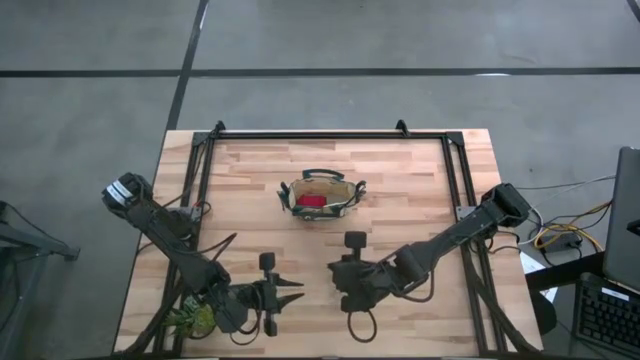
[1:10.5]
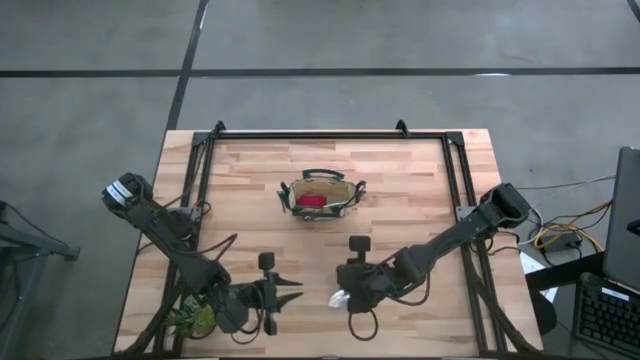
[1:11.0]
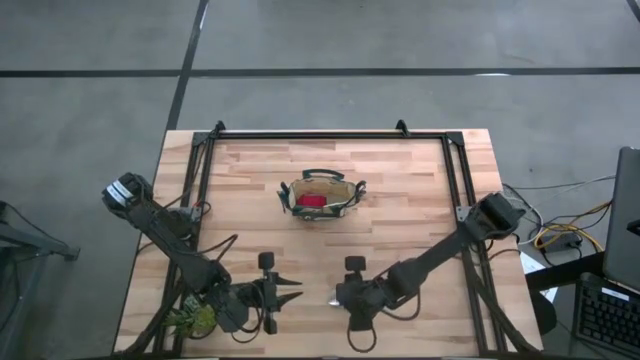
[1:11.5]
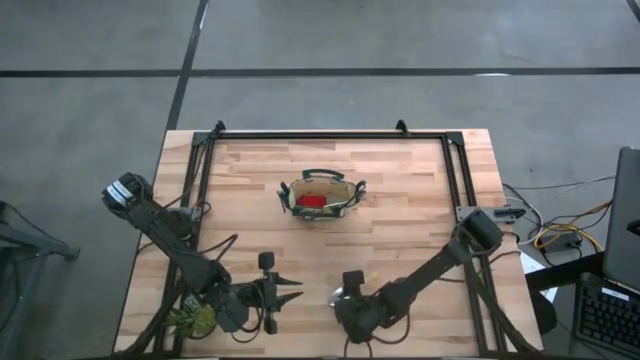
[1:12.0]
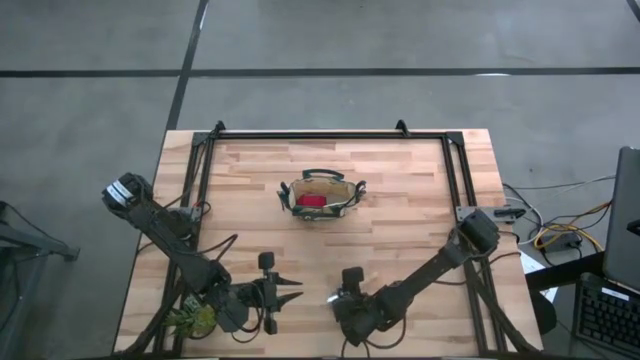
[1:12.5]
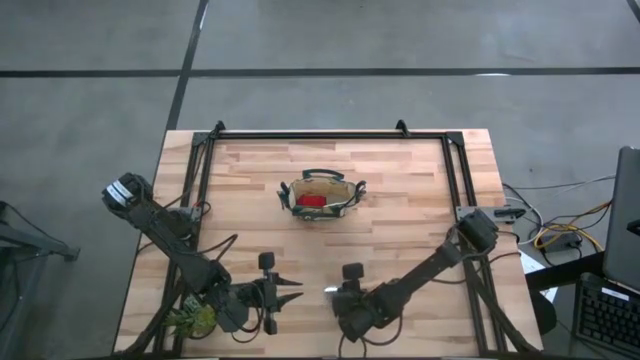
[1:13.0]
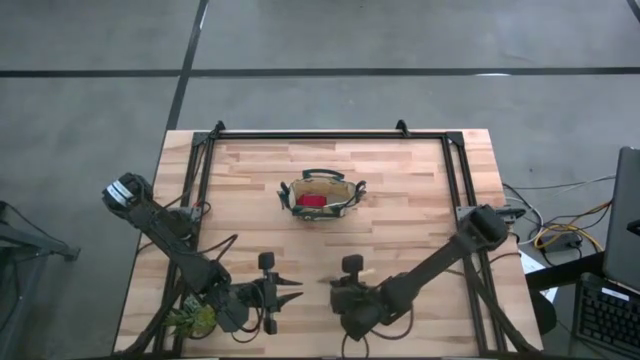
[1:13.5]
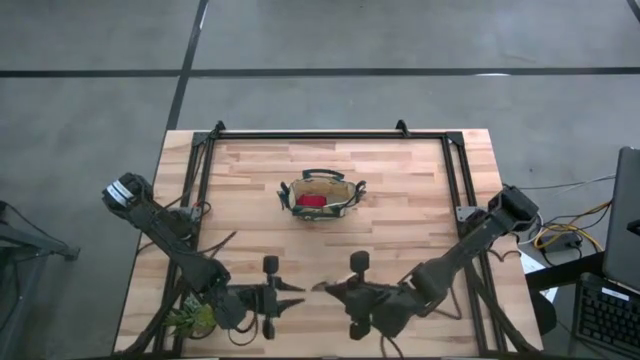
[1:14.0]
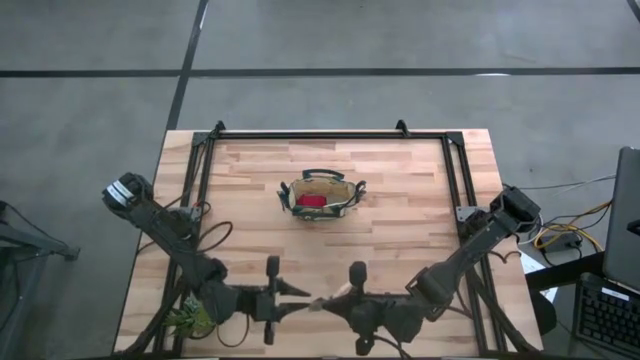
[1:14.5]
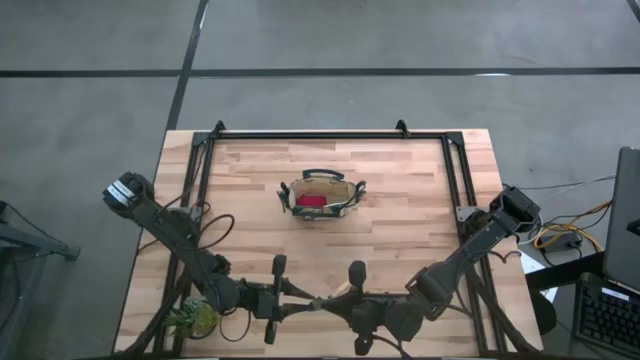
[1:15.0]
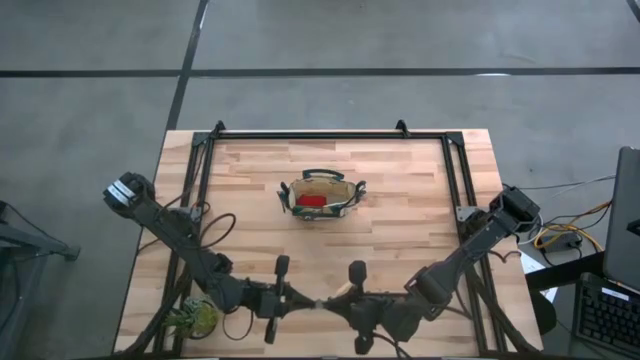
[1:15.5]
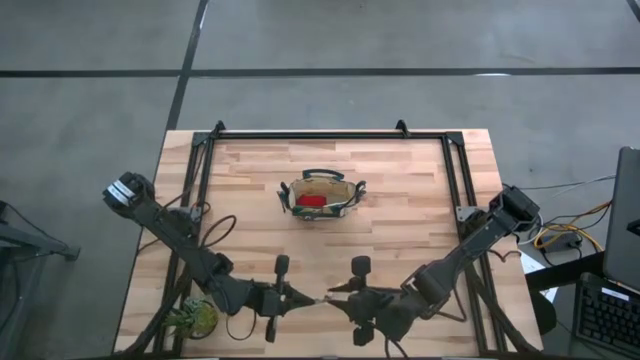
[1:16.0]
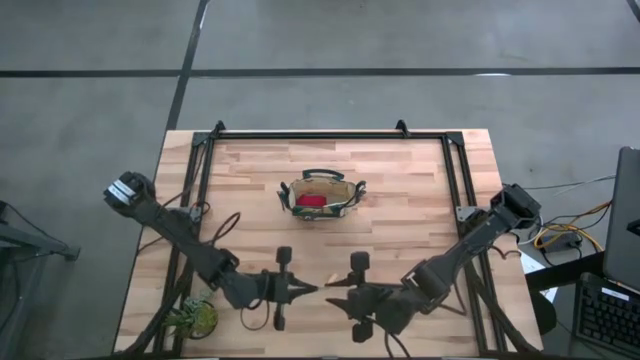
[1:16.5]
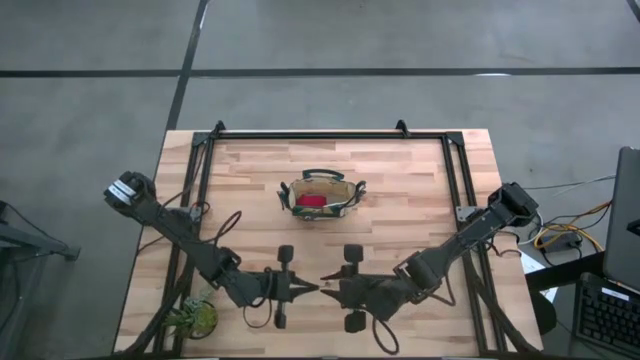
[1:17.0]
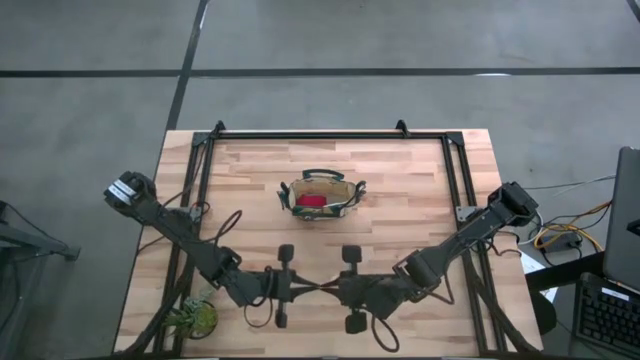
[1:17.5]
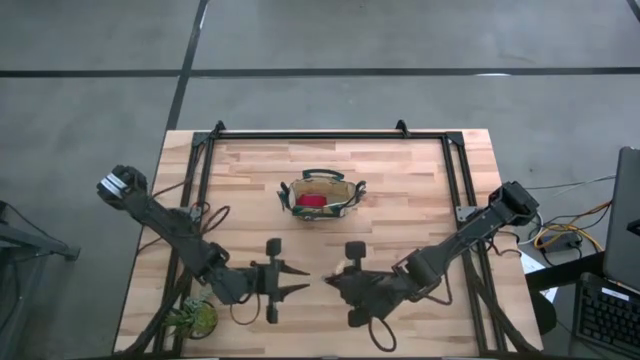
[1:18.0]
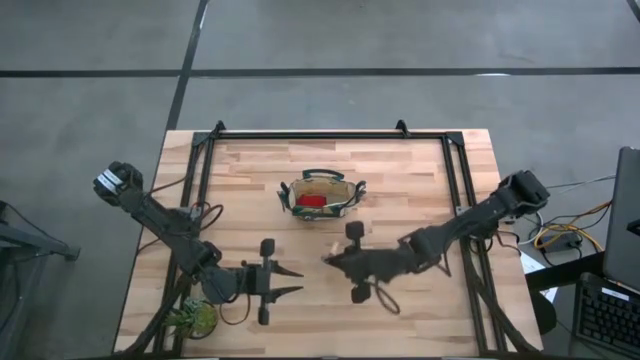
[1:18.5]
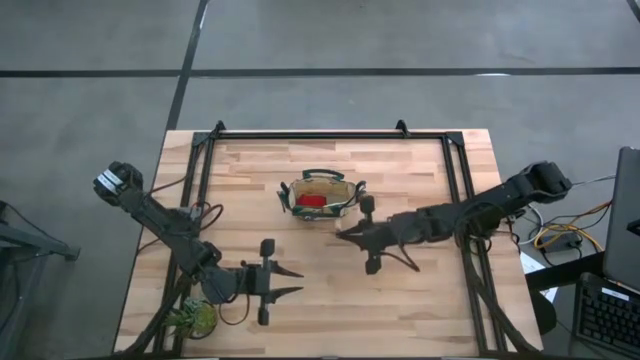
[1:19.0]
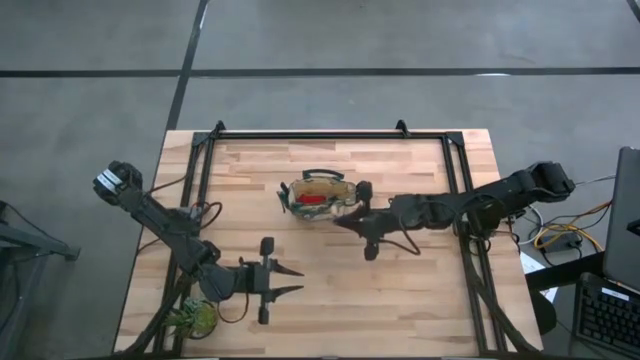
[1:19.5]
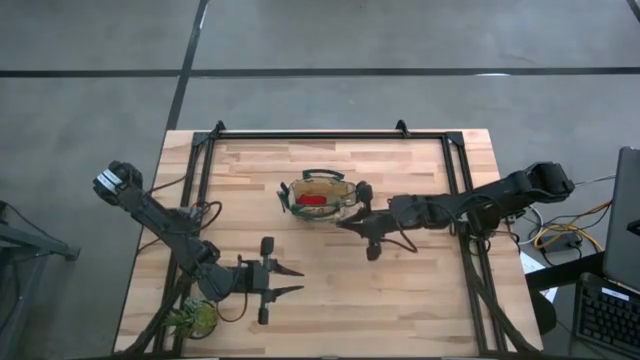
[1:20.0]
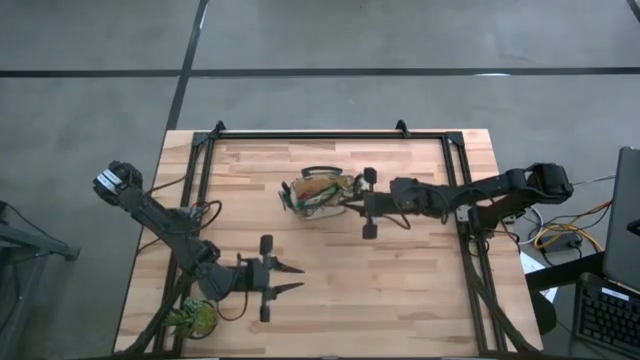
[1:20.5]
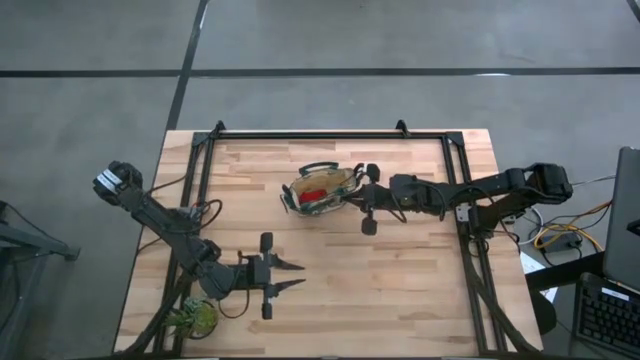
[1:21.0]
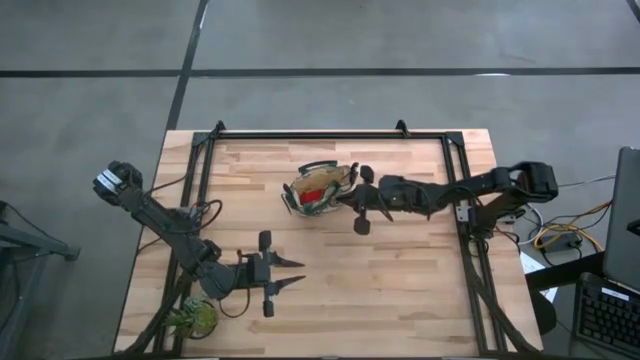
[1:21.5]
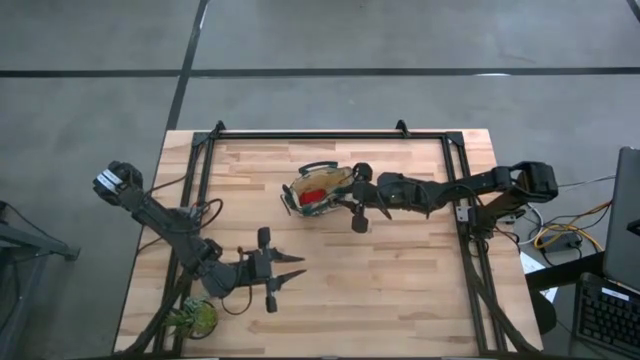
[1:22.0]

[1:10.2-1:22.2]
Task: Pick & Place Garden tools in Gardening bag
Put the brown trowel into the light brown gardening bag

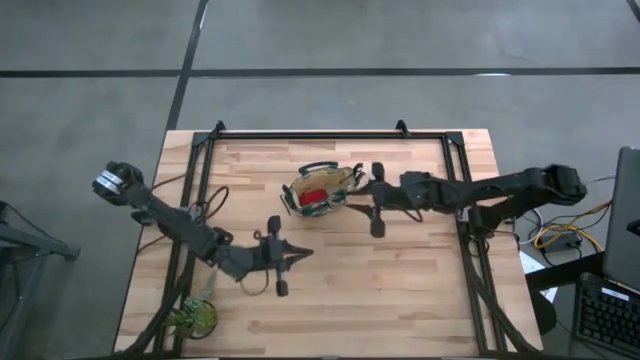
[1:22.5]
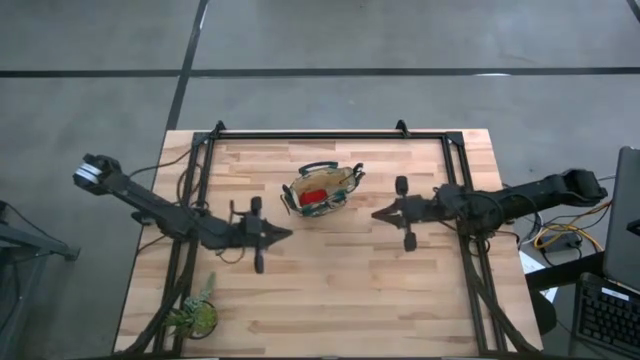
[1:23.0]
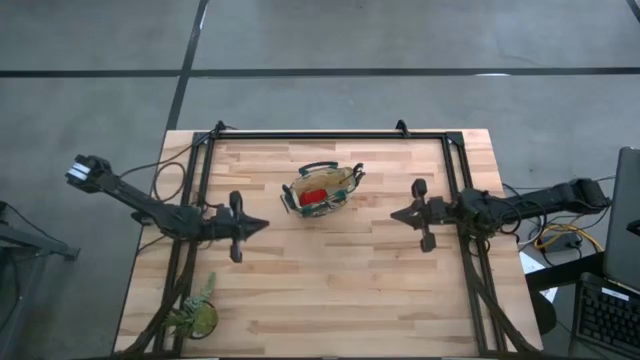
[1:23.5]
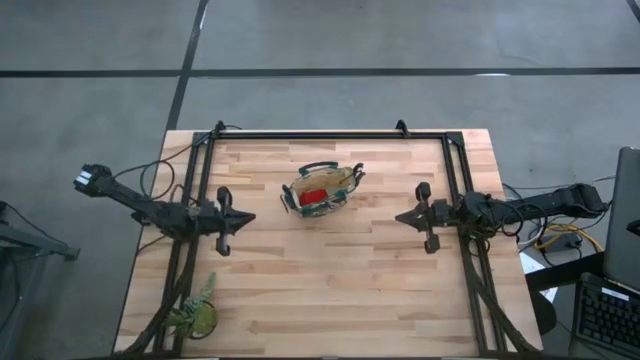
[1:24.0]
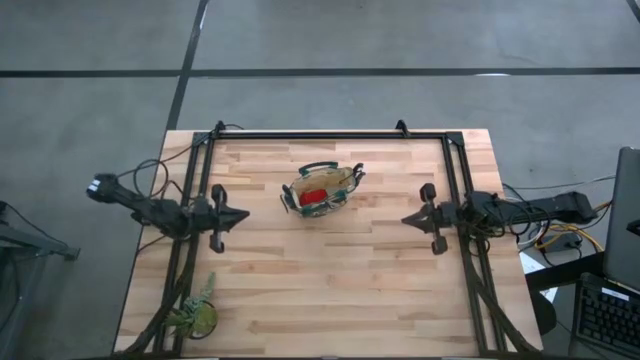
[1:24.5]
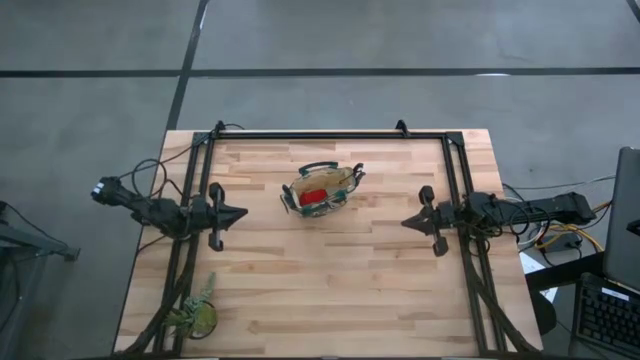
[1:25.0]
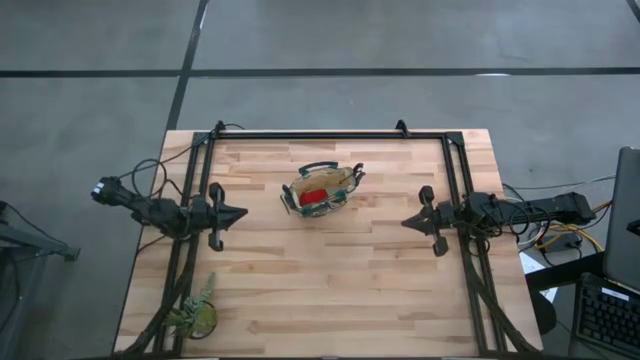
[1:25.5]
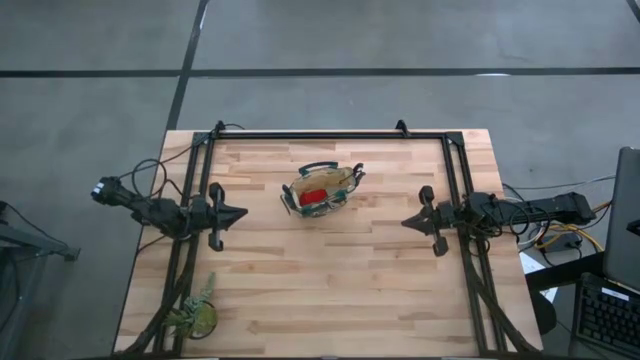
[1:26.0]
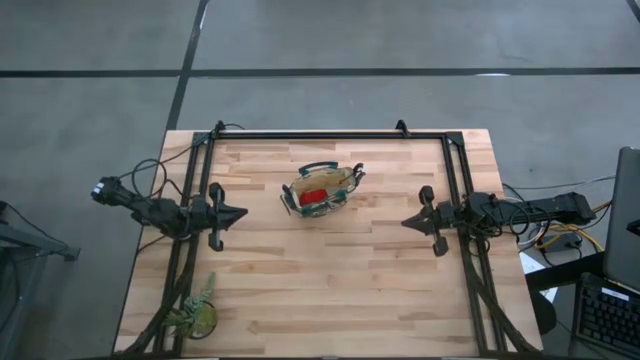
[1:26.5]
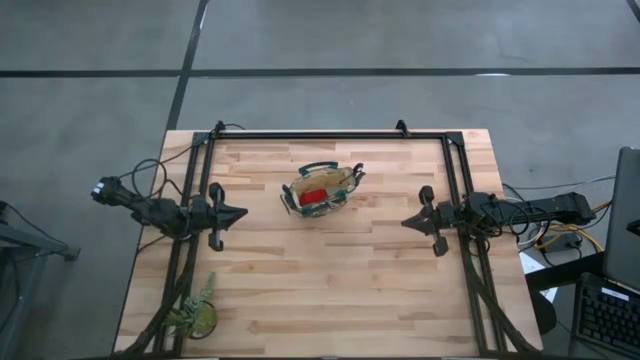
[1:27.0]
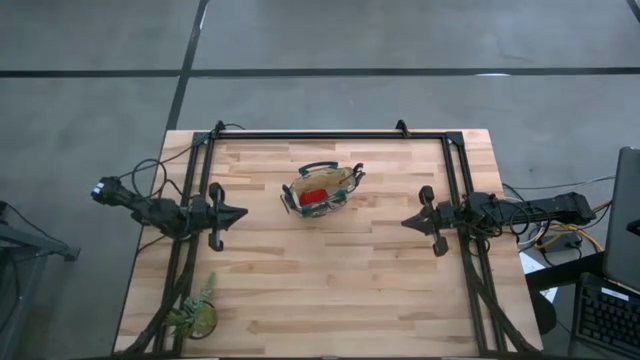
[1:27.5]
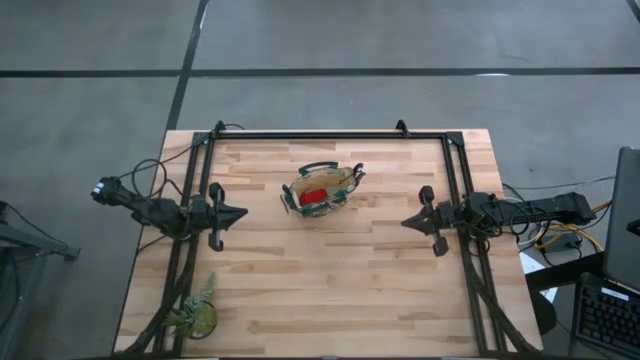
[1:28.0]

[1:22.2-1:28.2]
Return to Home Position

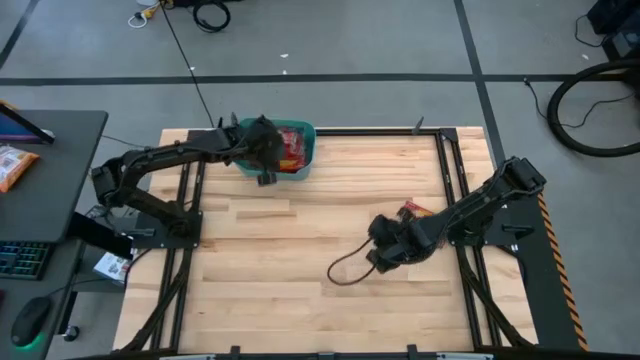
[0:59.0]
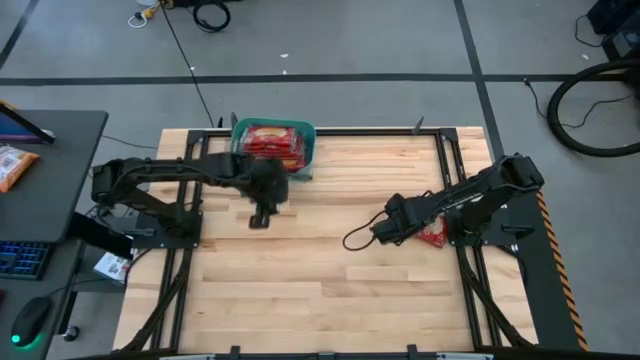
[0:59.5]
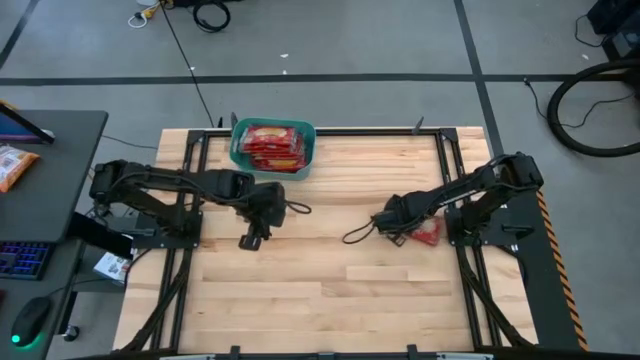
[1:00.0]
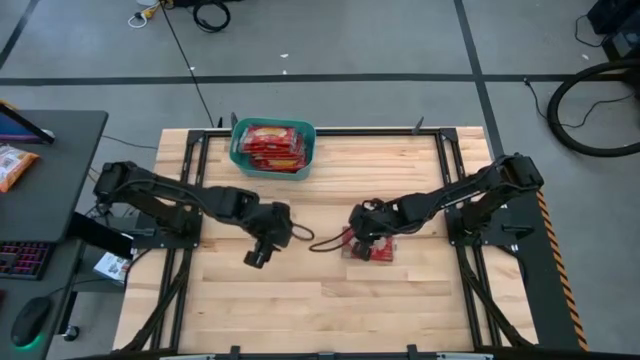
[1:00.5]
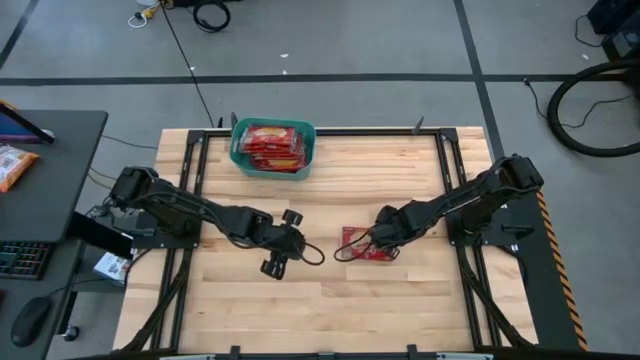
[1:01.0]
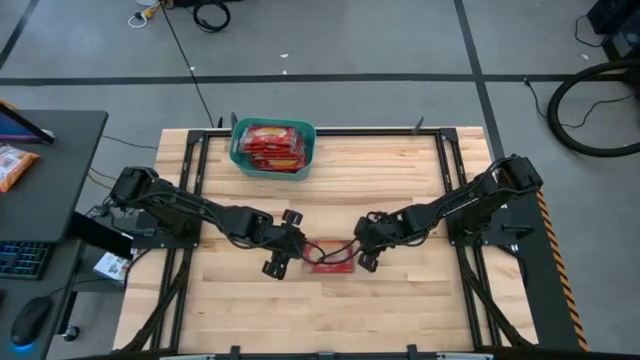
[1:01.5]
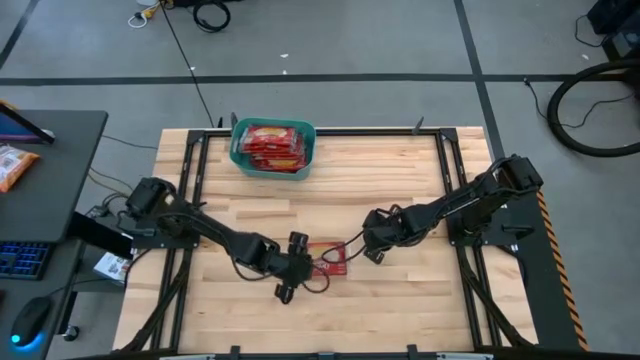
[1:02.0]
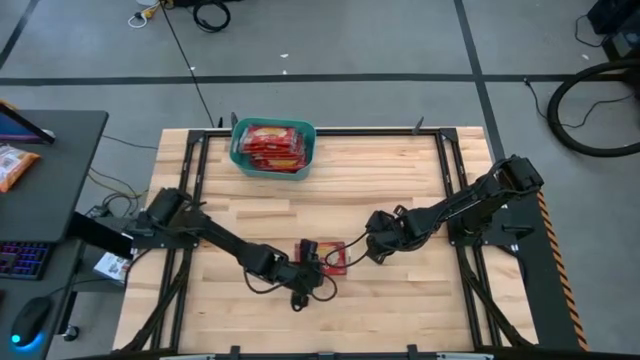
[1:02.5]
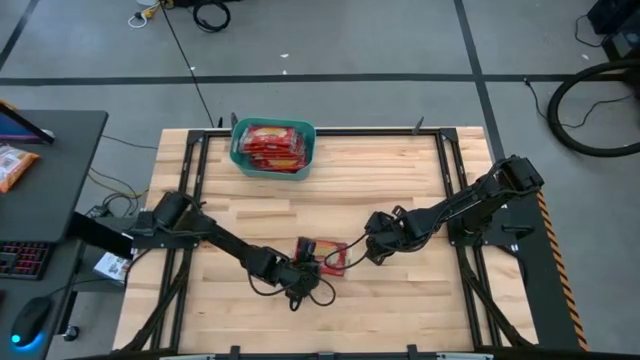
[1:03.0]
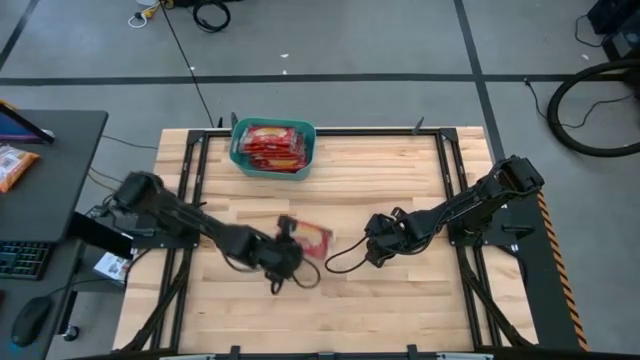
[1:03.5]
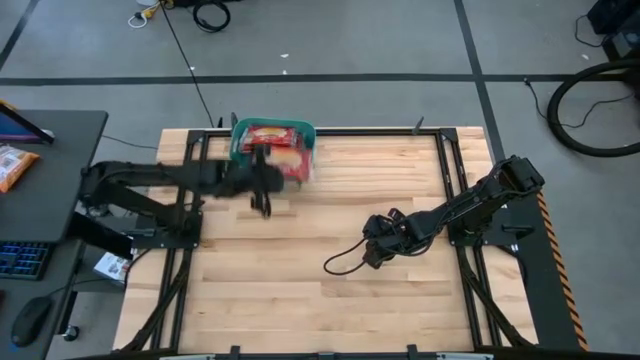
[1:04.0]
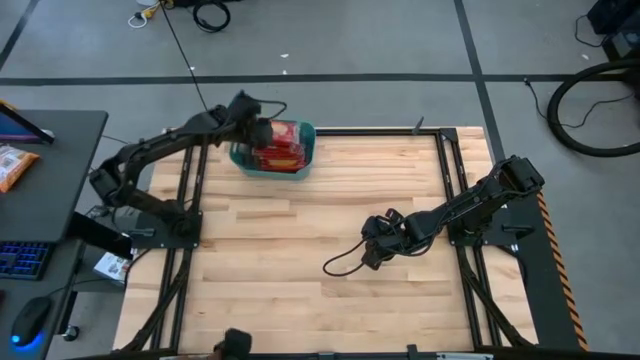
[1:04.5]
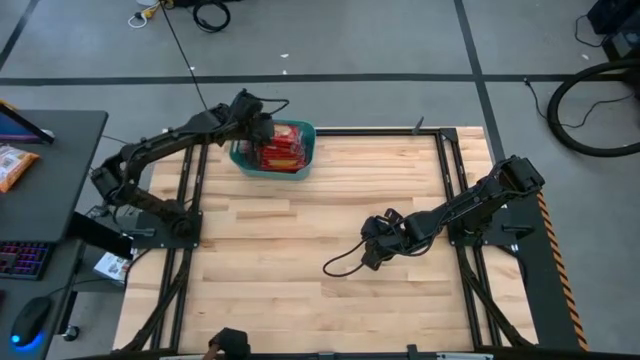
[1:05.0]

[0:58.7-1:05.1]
Task: Sort popcorn bags into baskets
Put the red popcorn bag into the green bin
